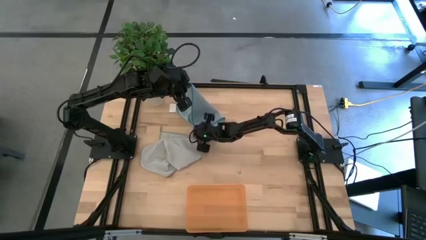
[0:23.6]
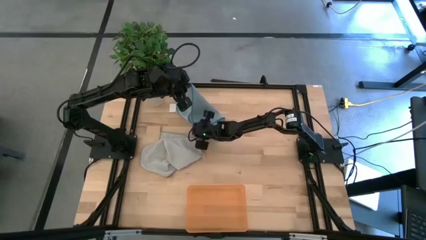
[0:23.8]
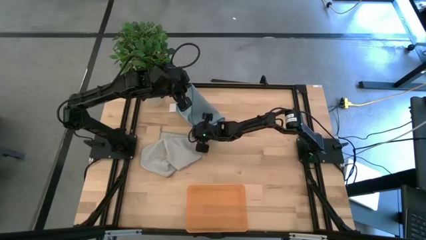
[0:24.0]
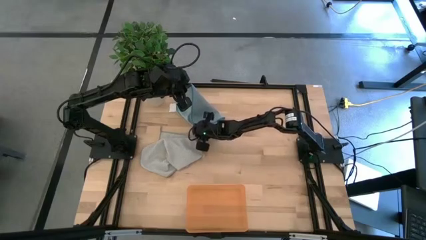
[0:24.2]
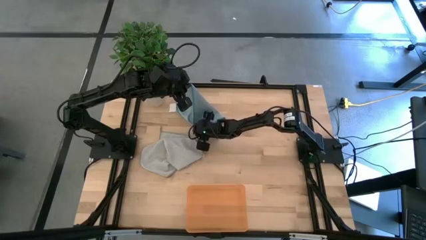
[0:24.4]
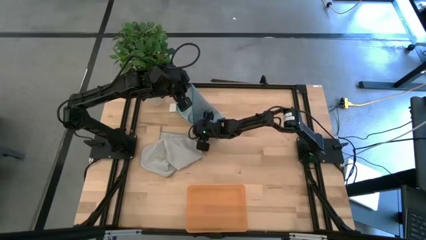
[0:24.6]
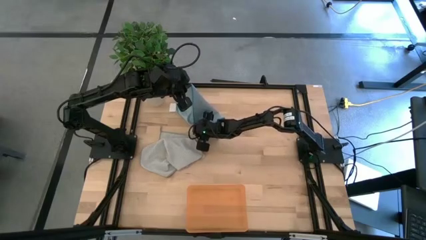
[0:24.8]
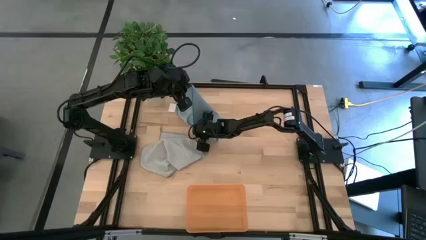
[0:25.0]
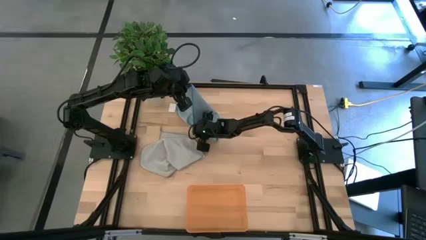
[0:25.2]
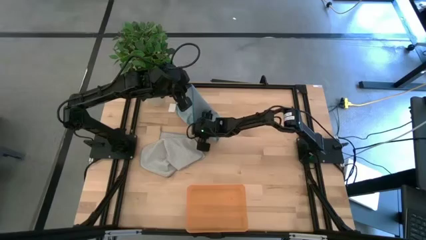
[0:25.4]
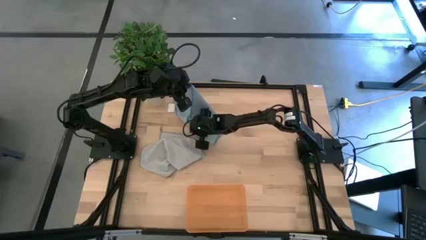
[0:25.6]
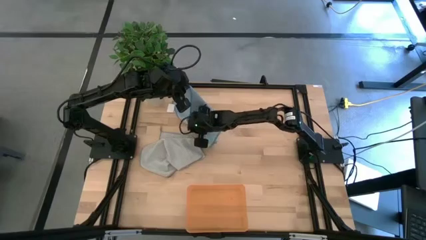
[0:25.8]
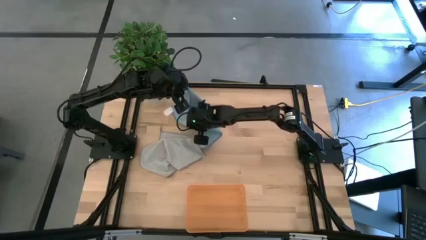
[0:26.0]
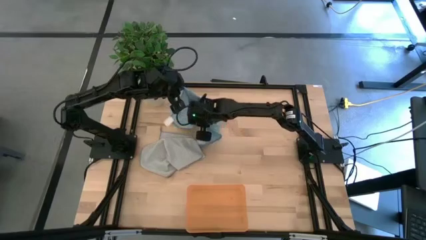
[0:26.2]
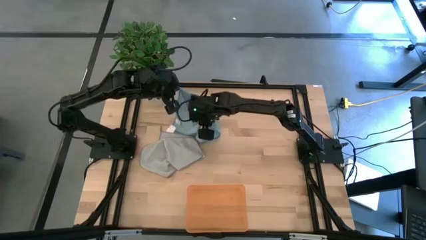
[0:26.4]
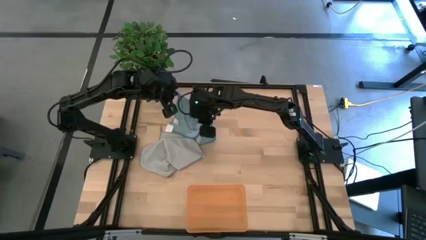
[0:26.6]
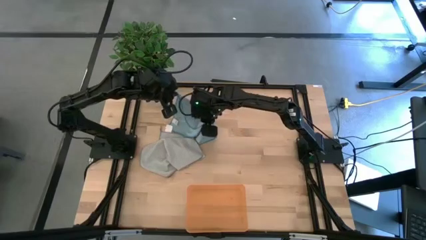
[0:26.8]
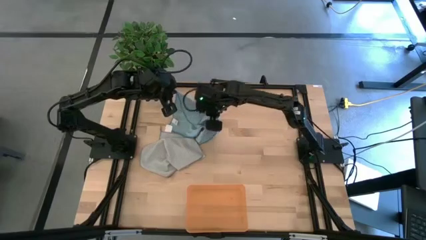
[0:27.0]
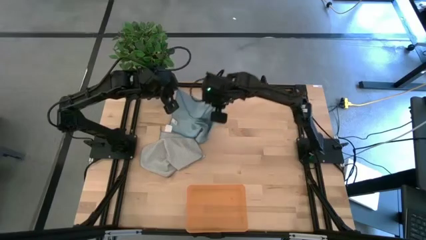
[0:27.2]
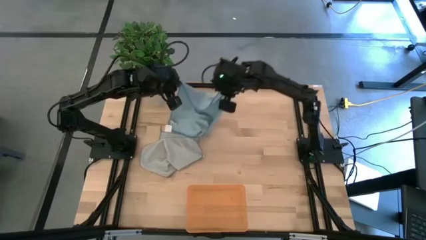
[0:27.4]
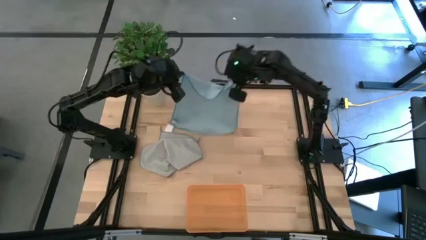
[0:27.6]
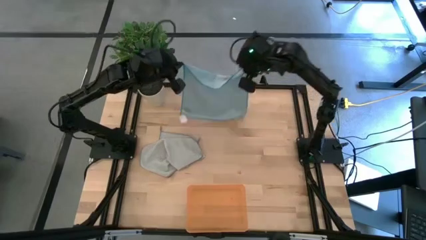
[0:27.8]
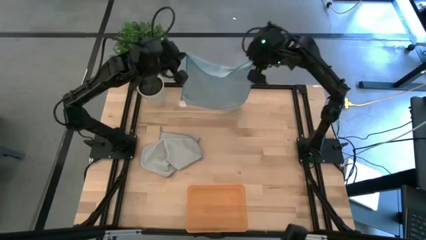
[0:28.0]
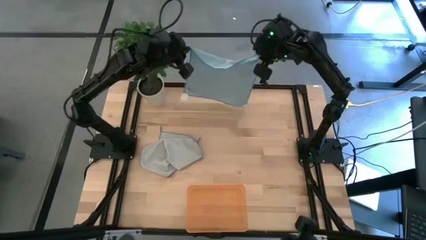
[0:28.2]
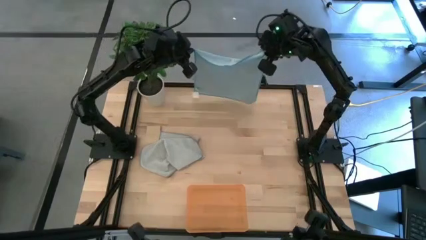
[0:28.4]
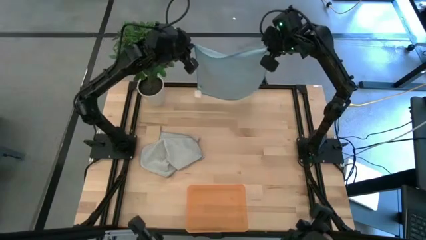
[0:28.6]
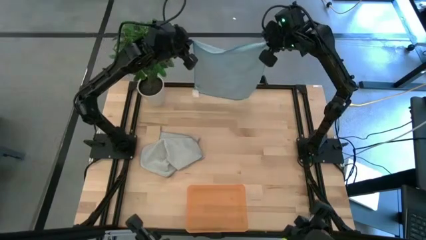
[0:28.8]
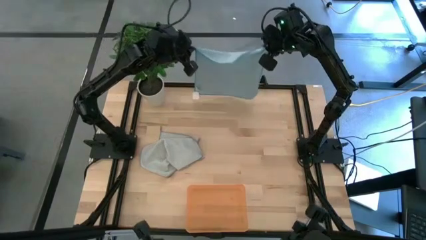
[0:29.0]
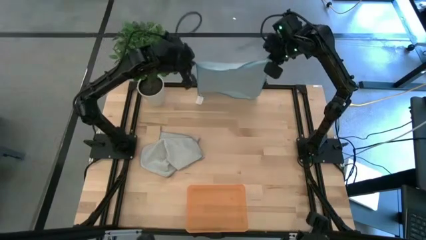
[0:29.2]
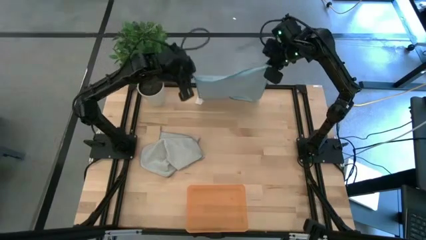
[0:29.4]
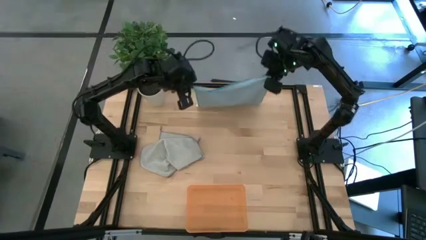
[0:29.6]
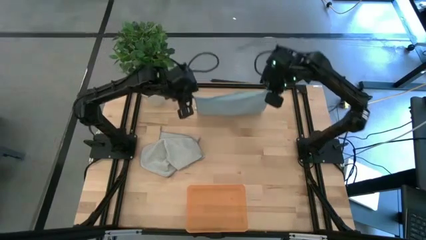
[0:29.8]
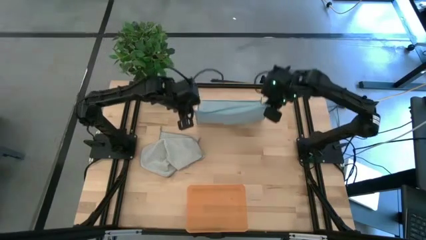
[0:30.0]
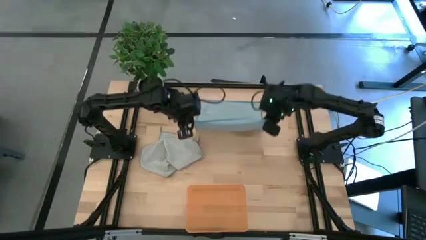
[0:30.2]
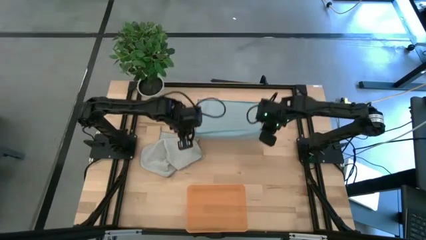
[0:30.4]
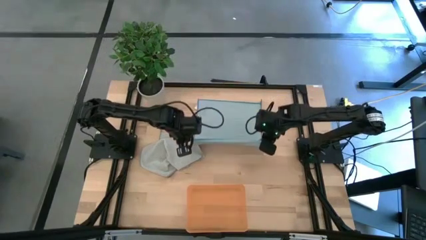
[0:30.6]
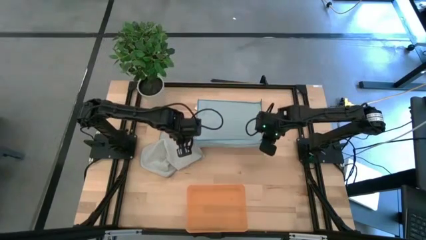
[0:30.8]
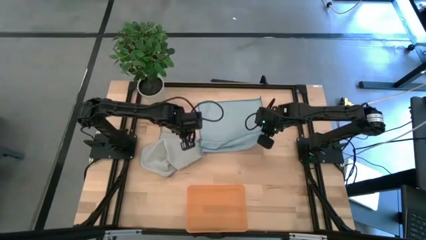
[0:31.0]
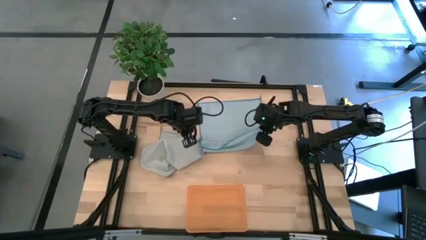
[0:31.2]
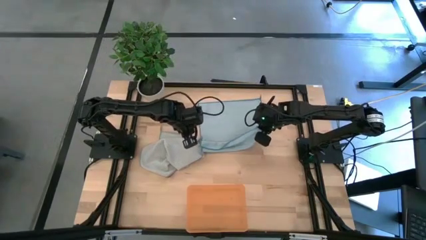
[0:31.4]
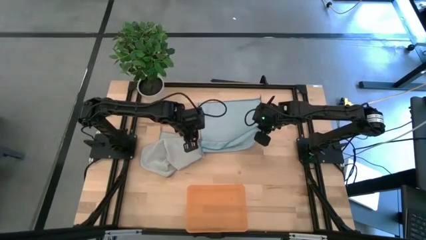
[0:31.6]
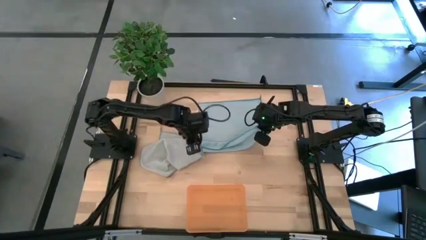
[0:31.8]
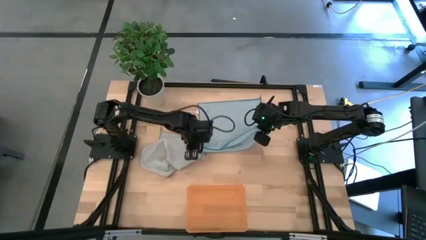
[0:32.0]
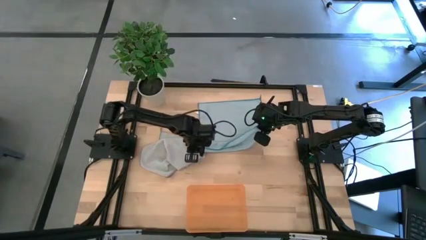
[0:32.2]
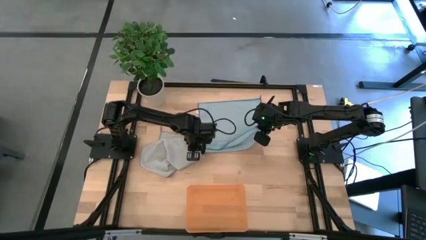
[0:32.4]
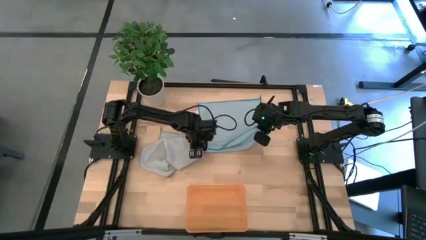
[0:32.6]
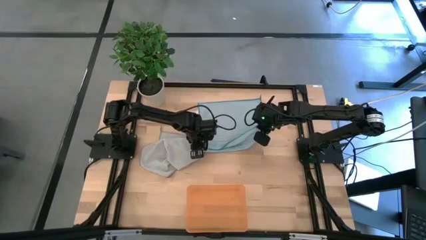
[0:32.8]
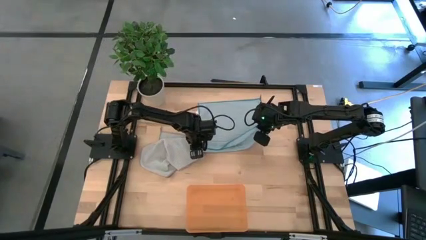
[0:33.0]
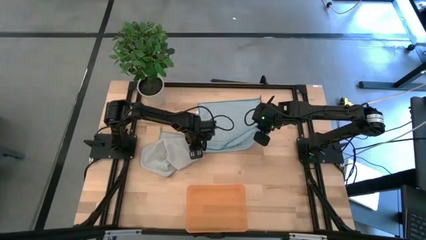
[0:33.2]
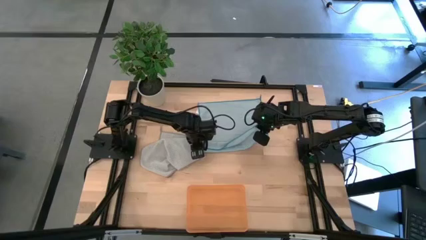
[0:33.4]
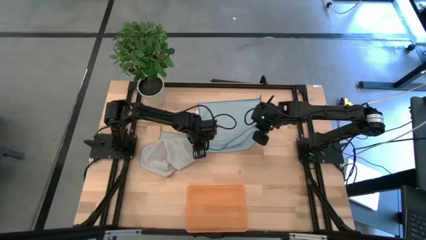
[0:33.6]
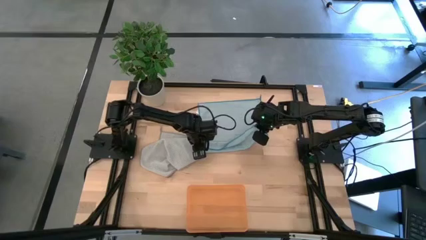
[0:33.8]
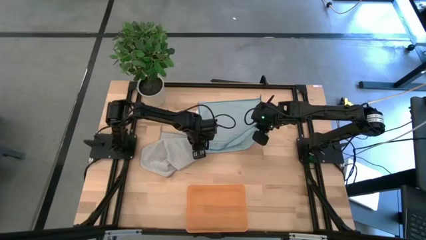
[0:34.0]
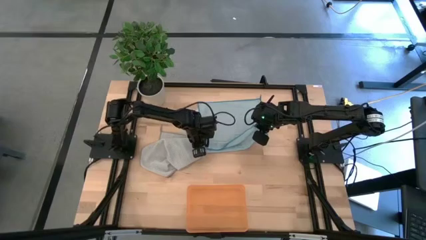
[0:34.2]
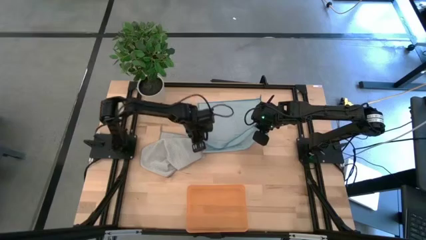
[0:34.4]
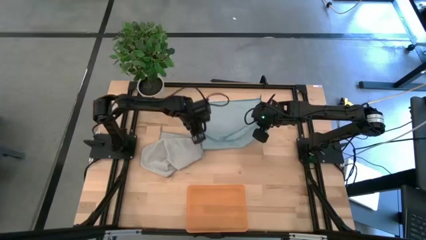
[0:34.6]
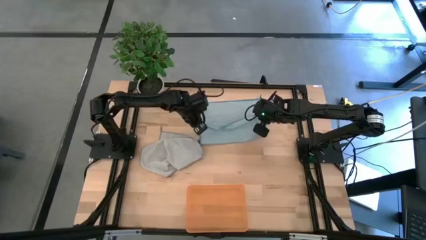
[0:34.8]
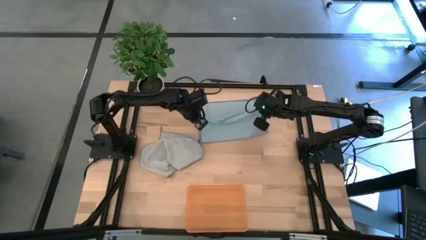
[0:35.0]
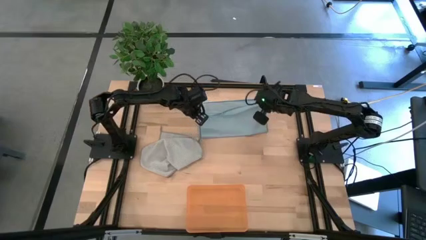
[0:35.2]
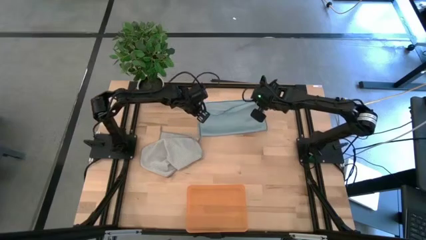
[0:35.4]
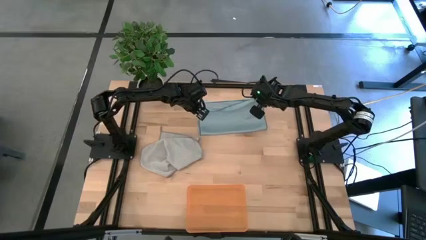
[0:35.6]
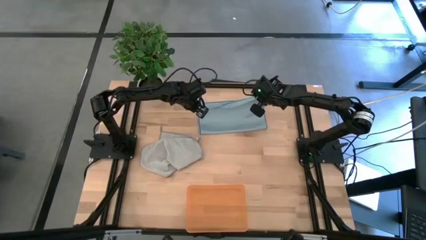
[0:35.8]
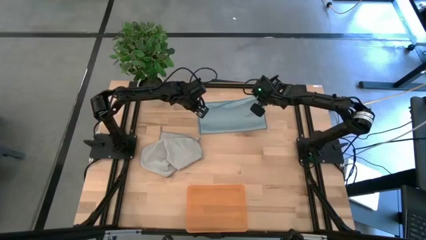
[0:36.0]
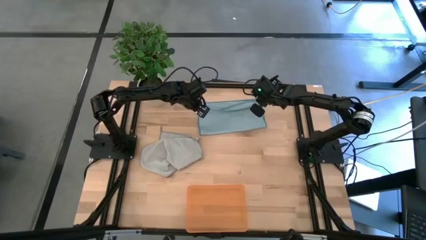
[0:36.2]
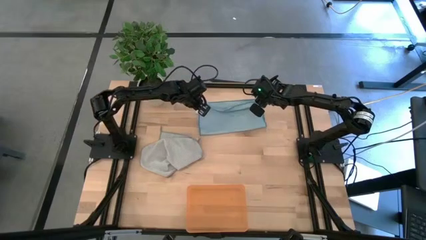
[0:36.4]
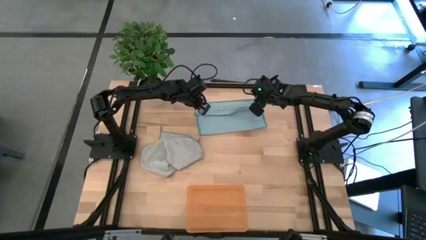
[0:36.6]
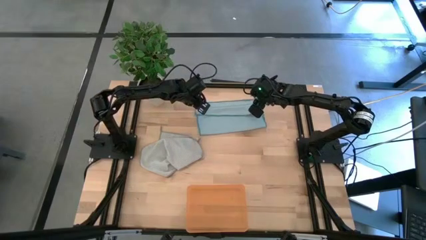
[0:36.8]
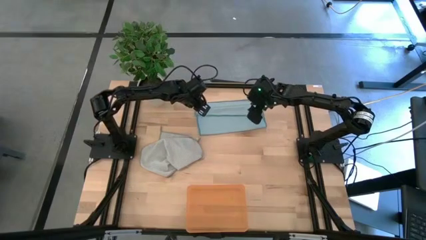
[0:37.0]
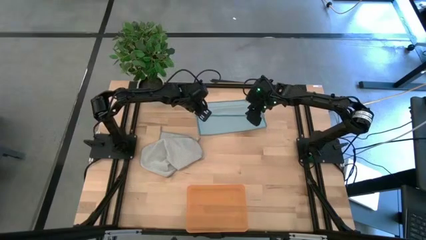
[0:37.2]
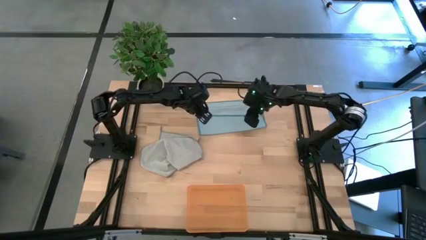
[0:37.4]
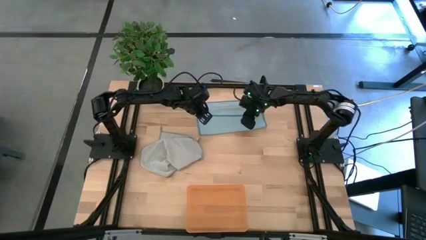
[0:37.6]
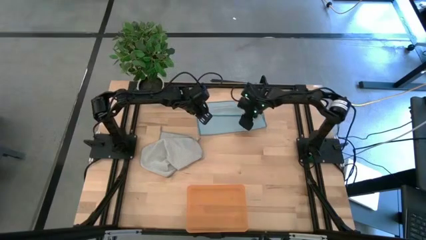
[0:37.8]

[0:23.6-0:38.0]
Task: Roll microfiber towels into tight, uniform cylinder then place into a basket
Fold the blue towel
